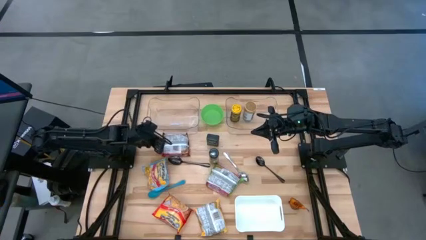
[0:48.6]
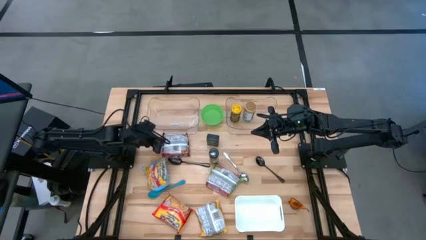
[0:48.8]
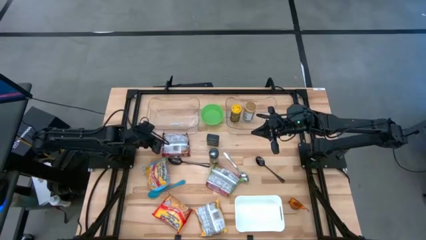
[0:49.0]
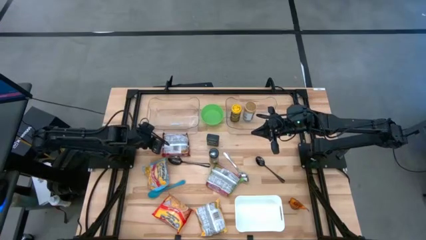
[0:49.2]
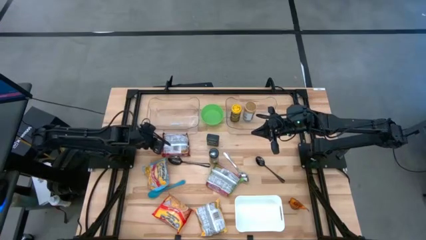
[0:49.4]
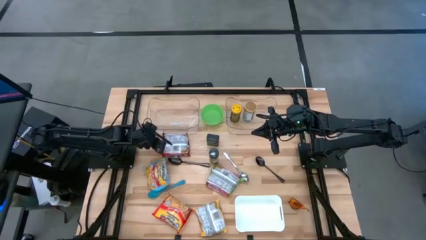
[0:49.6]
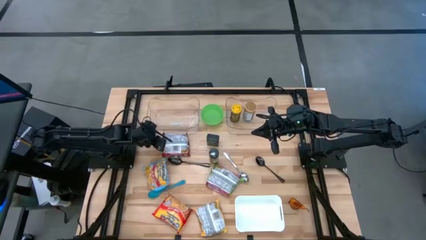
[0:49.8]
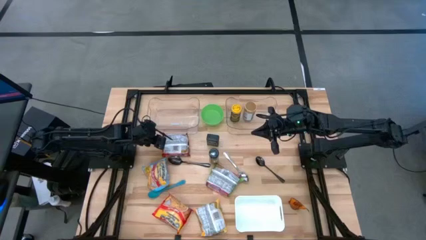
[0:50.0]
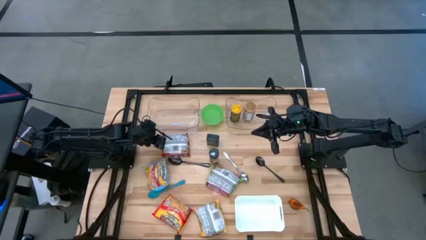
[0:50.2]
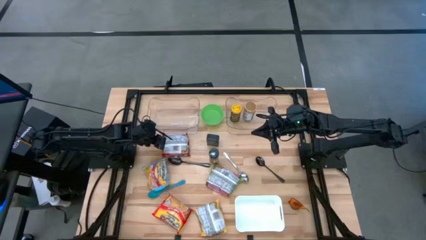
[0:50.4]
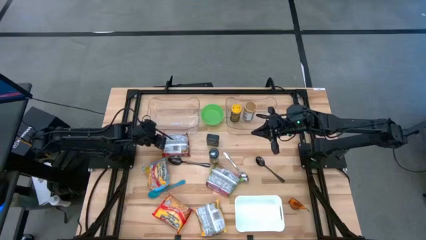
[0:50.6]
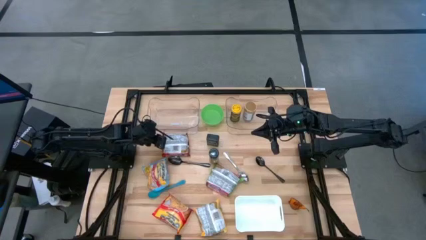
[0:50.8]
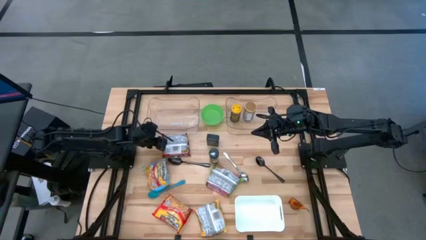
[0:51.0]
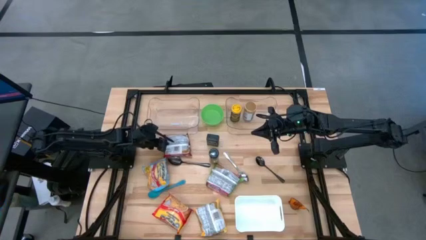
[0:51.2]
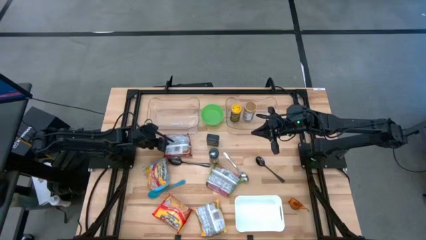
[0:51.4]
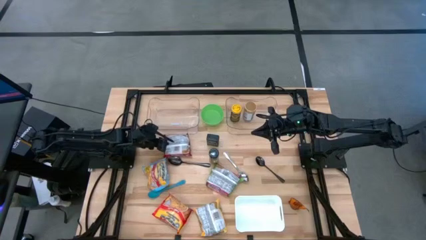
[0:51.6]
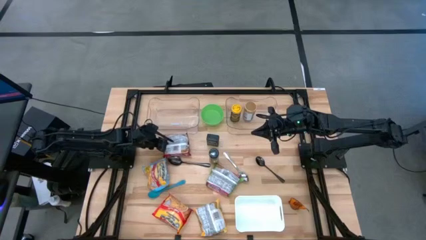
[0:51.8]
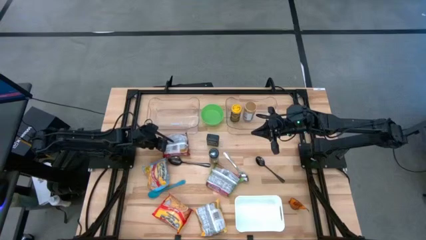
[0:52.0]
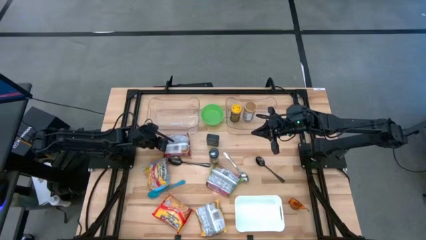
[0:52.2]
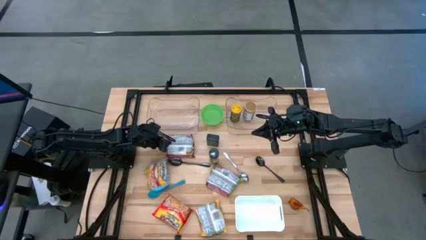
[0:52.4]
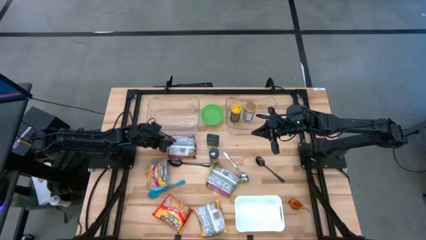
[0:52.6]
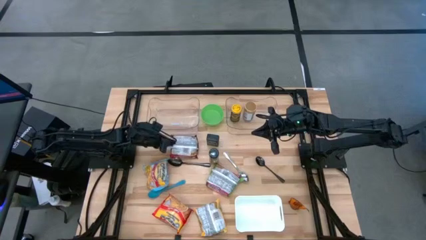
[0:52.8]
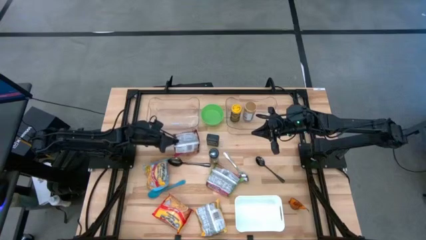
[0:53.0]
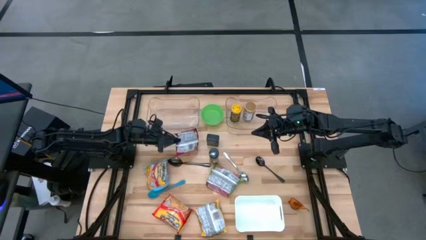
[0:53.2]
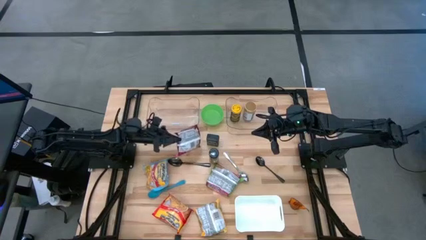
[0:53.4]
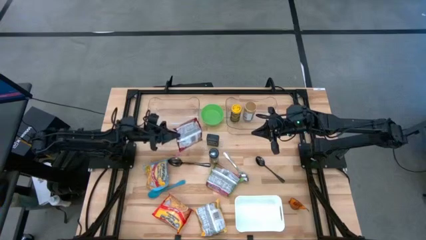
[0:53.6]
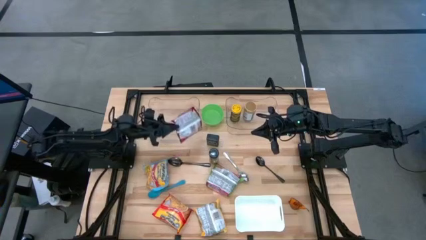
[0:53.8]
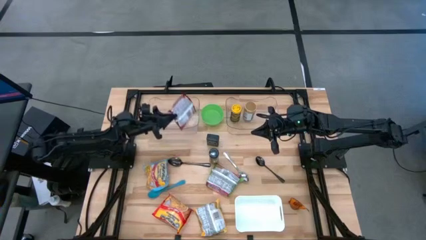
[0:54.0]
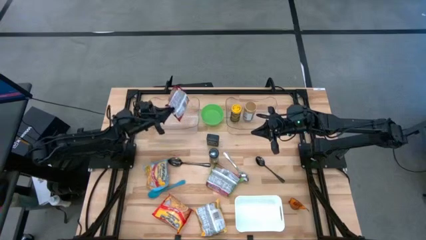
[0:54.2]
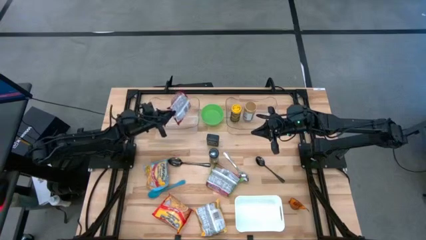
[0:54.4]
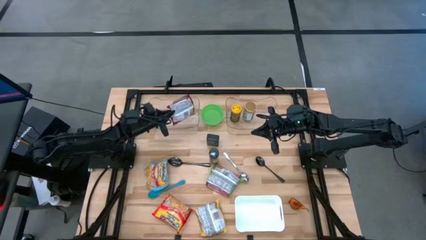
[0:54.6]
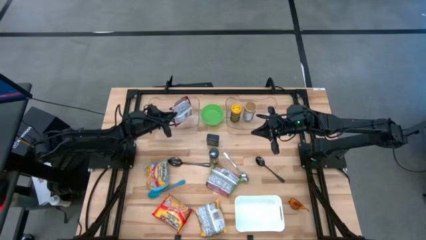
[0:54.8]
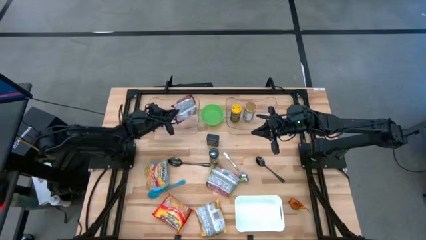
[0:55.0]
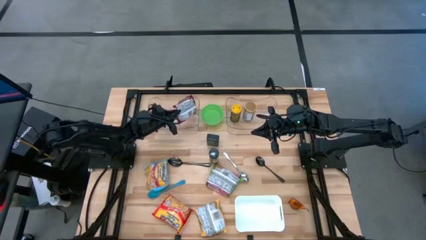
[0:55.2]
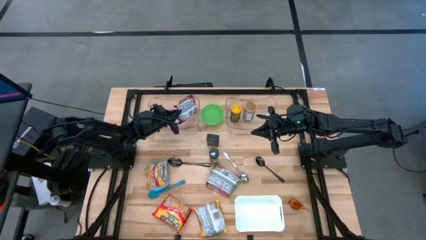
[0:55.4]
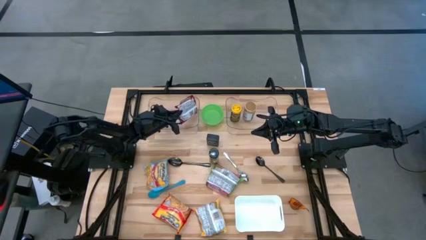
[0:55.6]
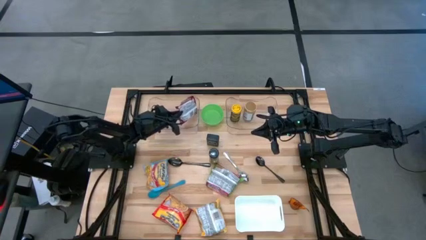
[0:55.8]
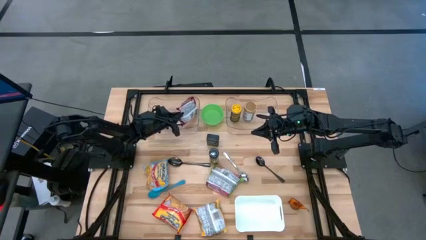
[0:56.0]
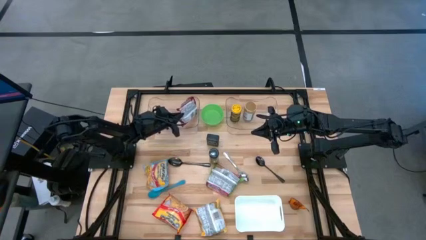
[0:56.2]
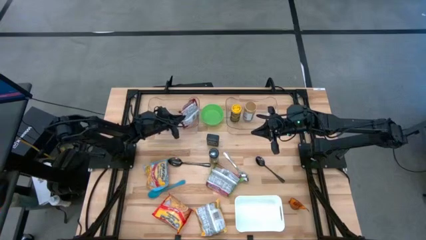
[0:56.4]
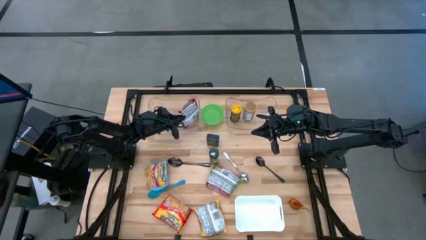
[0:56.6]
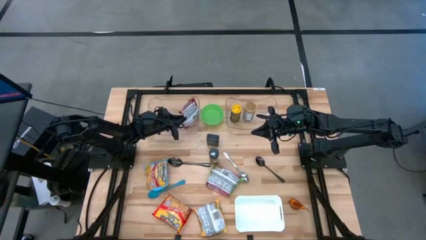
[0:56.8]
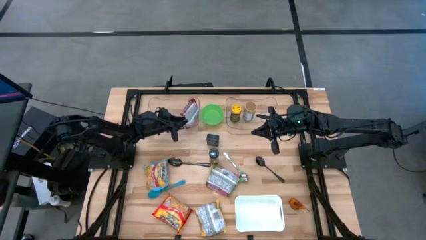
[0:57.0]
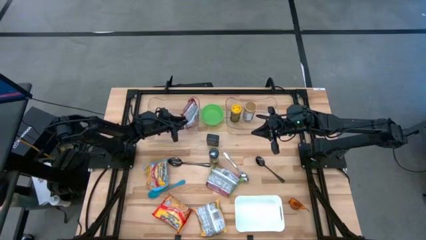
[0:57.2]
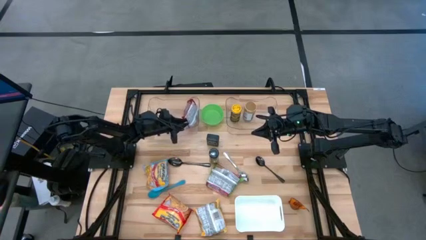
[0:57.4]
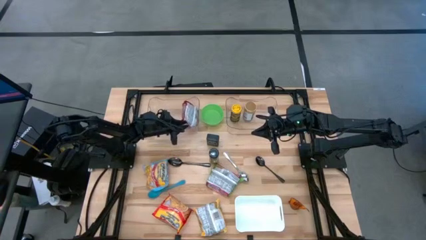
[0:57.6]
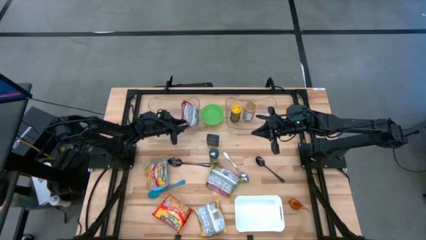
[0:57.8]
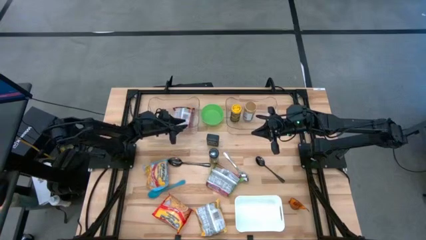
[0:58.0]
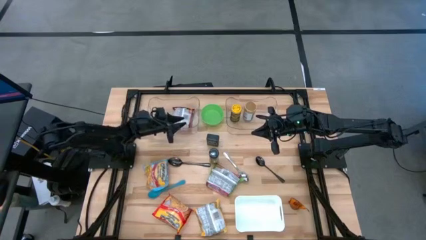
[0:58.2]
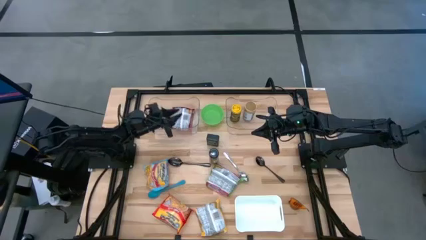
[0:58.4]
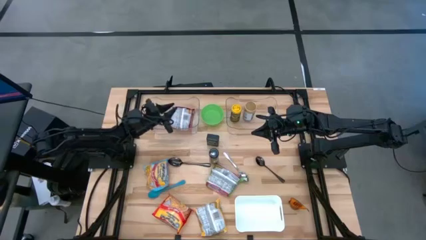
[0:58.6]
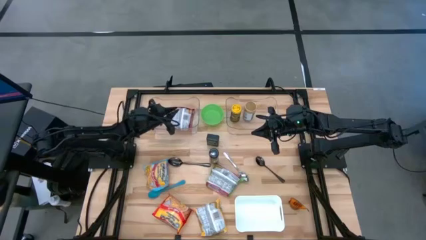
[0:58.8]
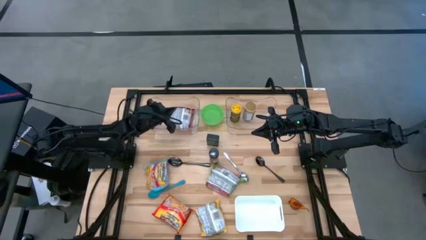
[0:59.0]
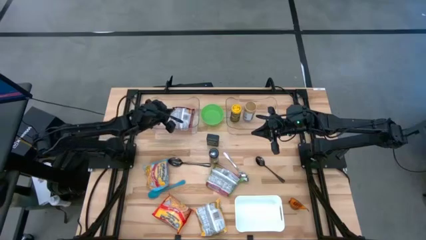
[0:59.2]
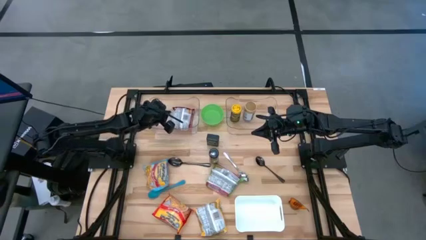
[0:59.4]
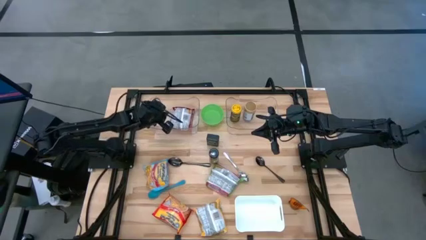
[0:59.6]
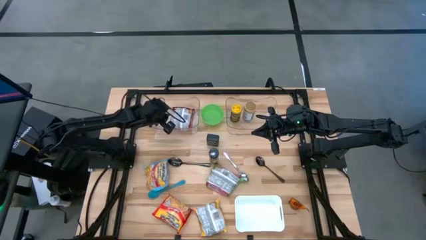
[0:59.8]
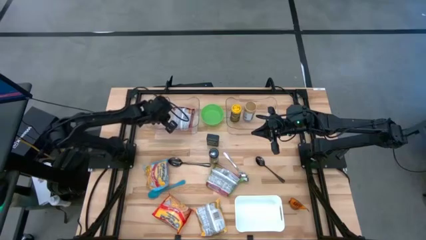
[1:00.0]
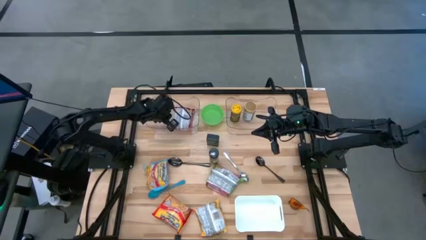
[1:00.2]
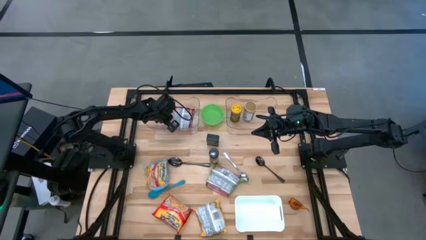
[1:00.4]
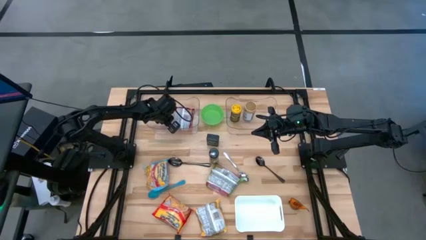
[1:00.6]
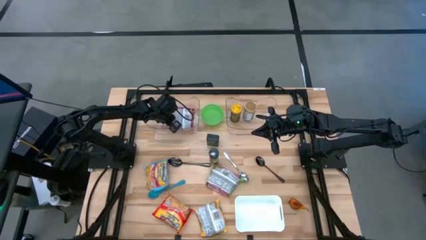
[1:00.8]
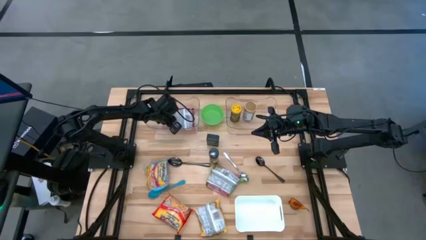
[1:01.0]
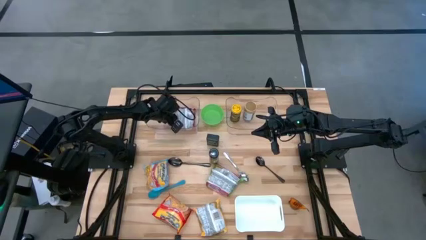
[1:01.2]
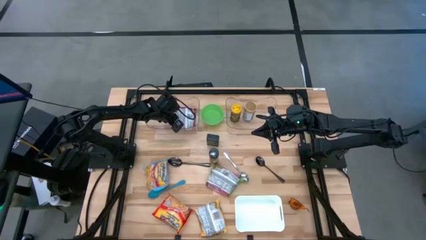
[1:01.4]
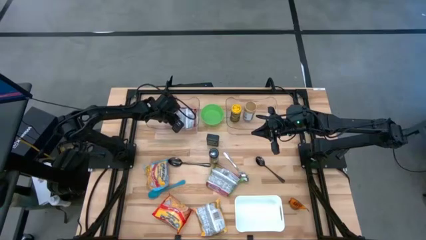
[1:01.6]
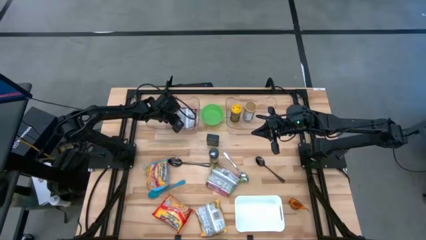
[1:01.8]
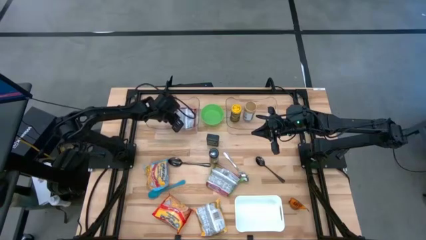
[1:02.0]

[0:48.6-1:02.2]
Task: Pick & Place Food Item
Put the red noodle pack in the left transparent bin

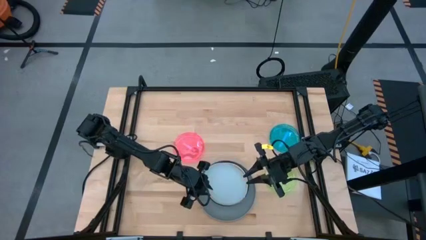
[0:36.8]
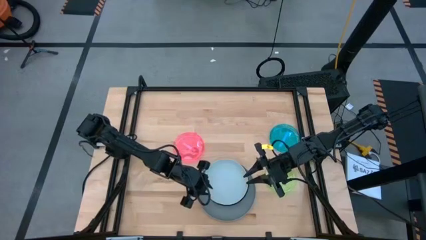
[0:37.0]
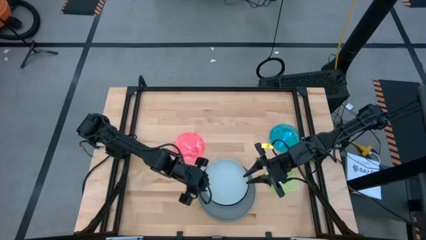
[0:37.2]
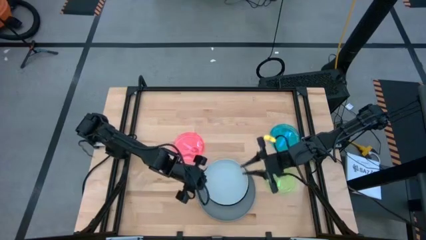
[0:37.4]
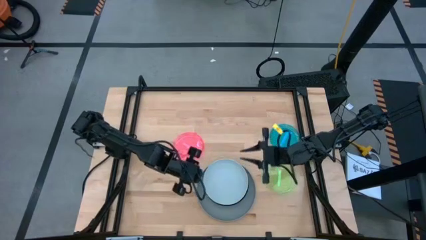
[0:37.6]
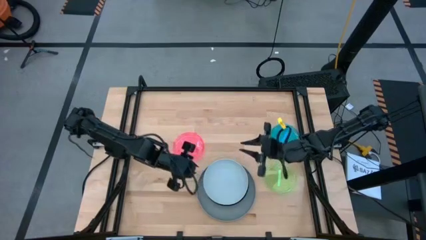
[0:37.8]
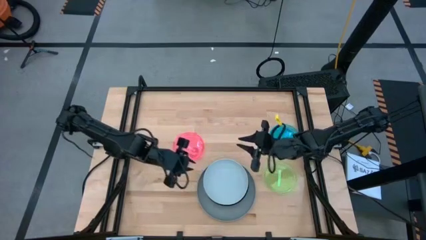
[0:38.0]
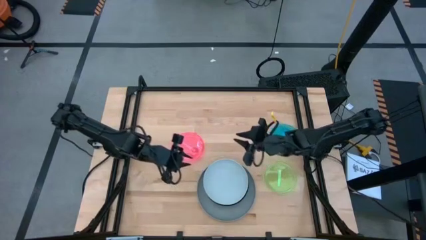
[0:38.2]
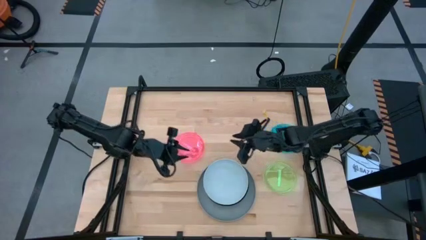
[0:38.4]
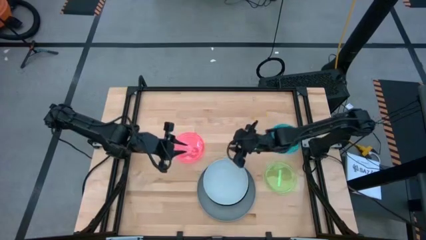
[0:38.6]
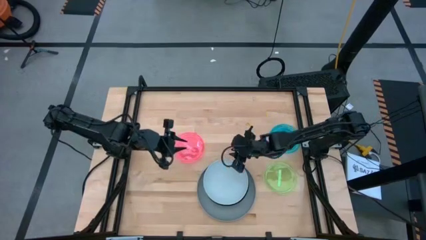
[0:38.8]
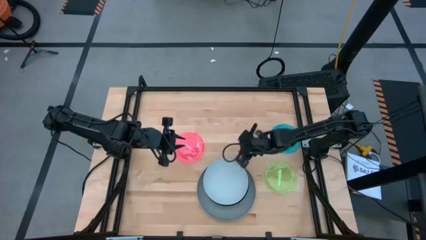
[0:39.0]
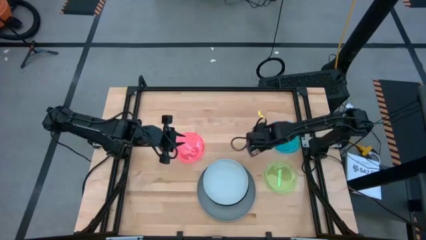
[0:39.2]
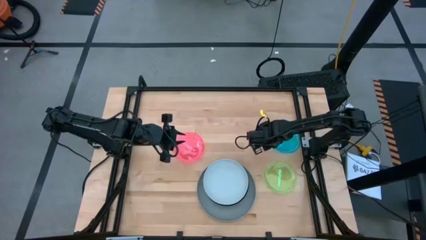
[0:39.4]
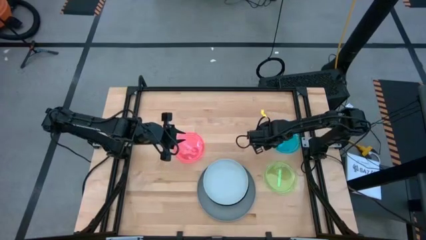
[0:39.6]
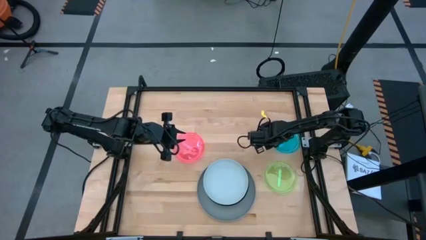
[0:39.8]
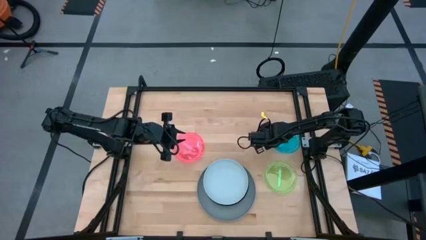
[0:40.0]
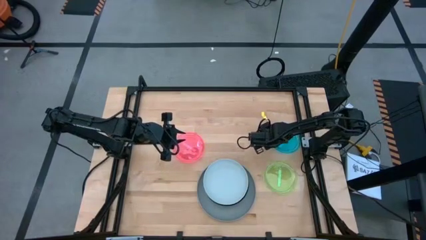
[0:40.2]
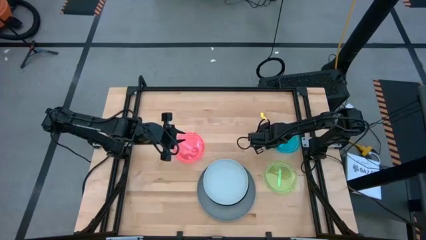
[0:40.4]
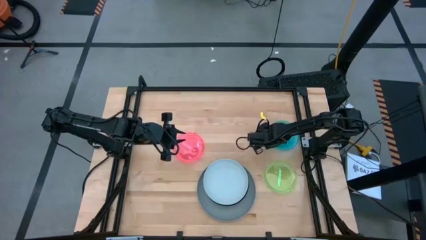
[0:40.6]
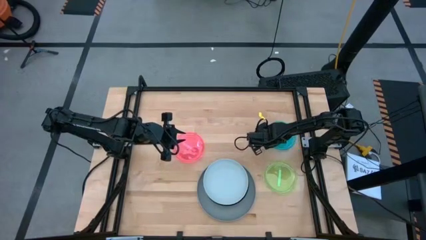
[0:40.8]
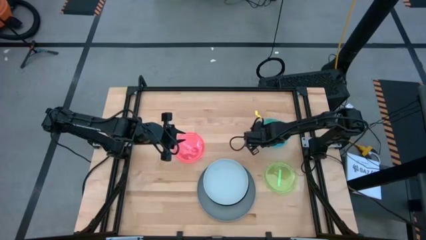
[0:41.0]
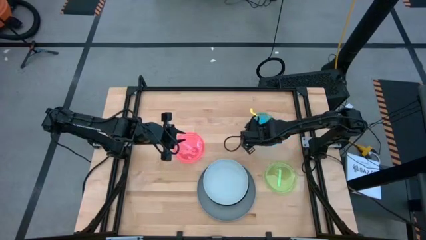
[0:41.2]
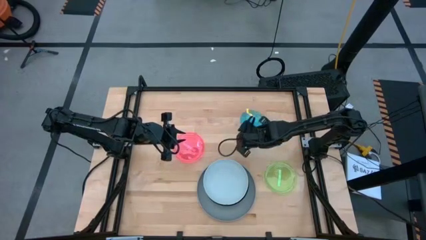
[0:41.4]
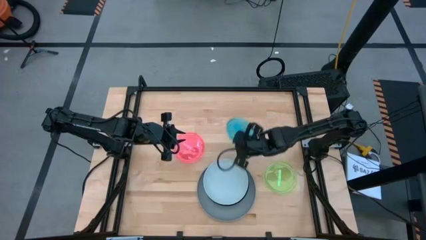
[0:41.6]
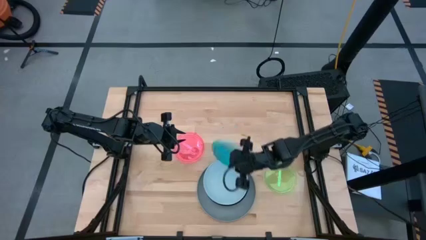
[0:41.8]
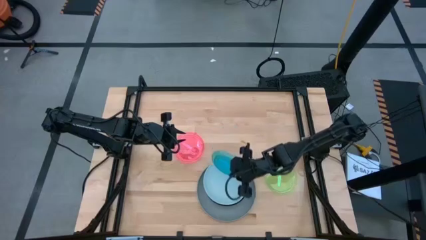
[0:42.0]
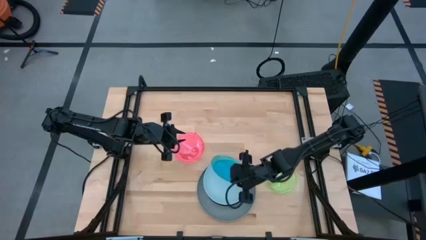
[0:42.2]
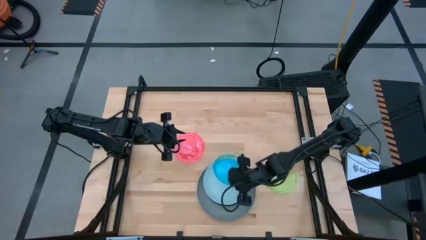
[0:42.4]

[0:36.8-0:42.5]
Task: Stack plastic plates
Stack the blue plate on top of the light blue plate
